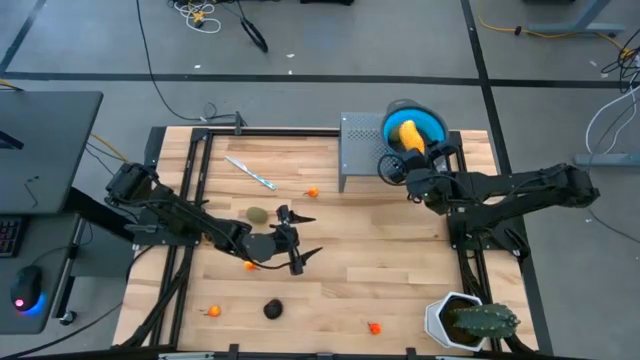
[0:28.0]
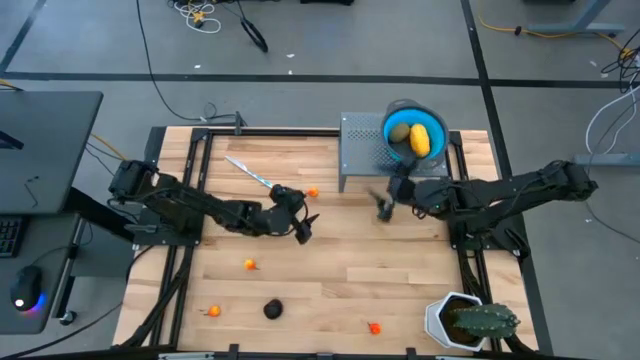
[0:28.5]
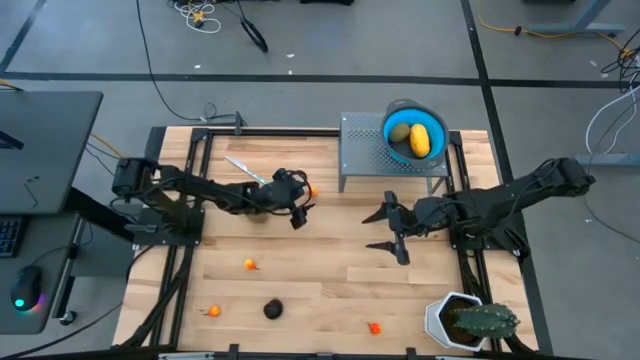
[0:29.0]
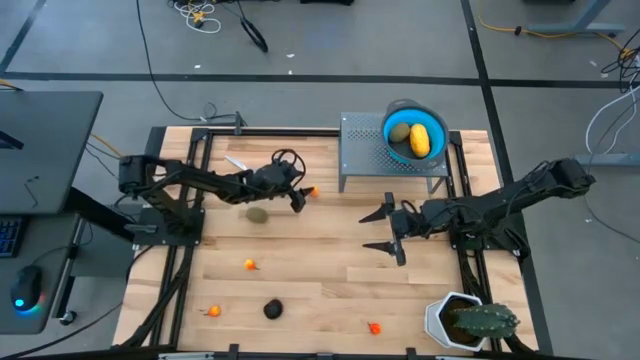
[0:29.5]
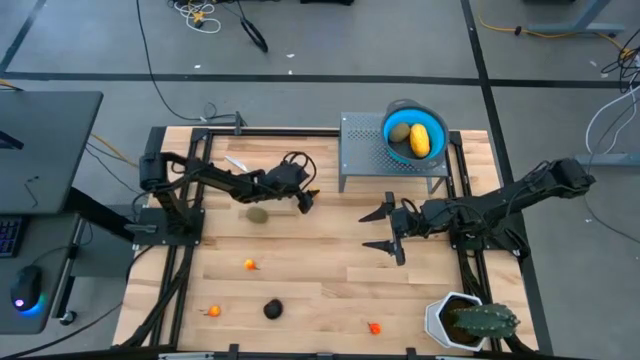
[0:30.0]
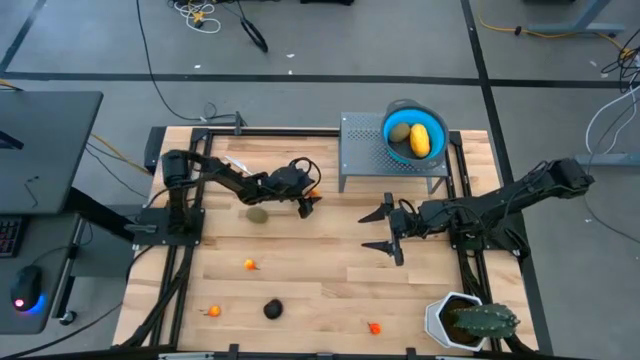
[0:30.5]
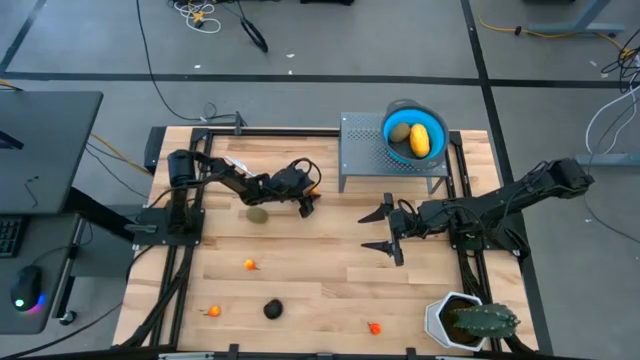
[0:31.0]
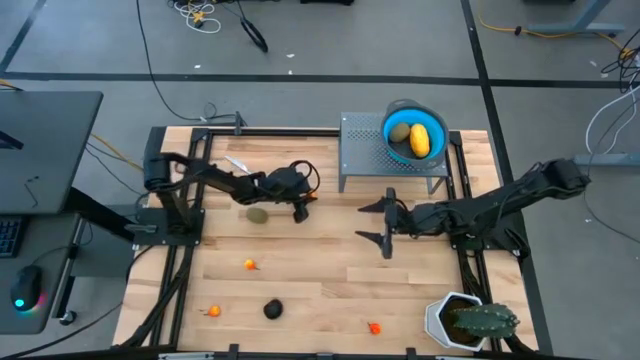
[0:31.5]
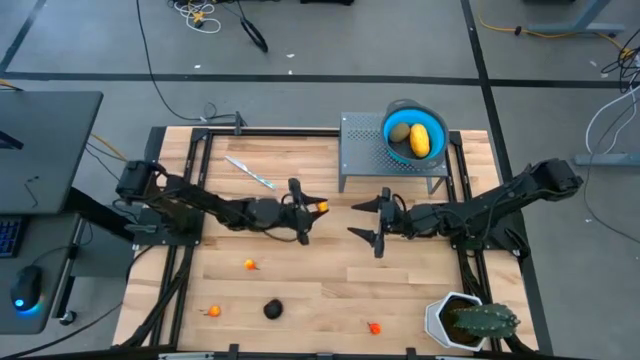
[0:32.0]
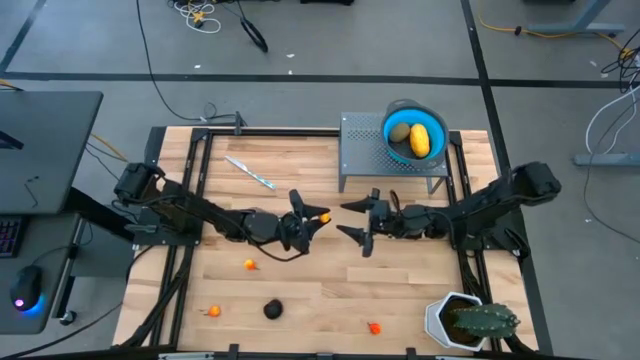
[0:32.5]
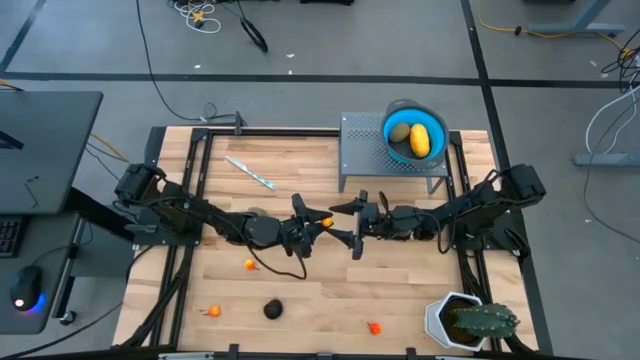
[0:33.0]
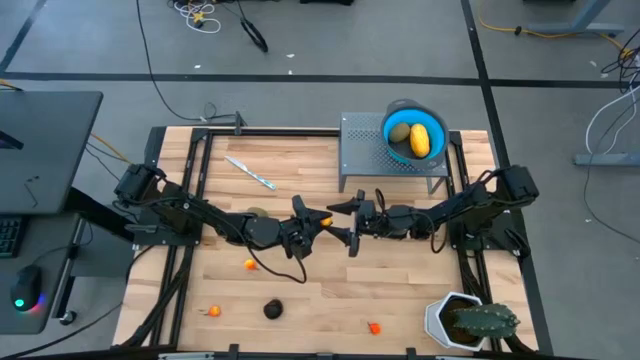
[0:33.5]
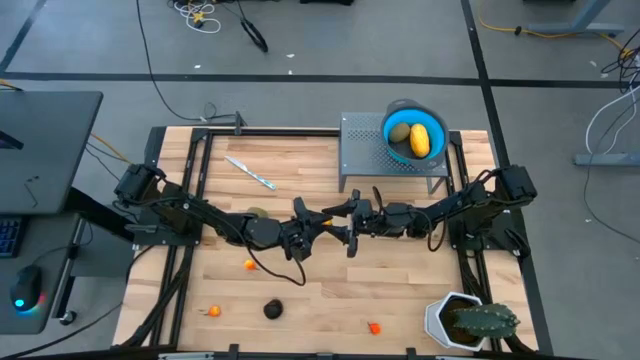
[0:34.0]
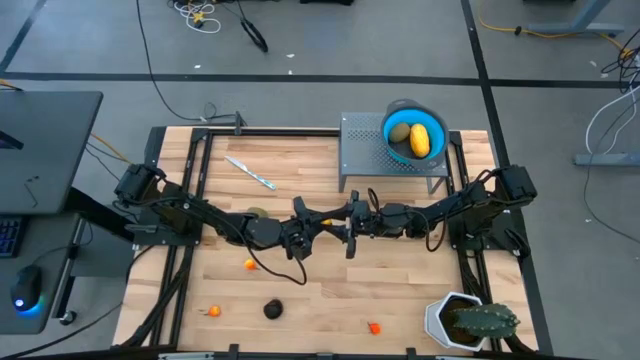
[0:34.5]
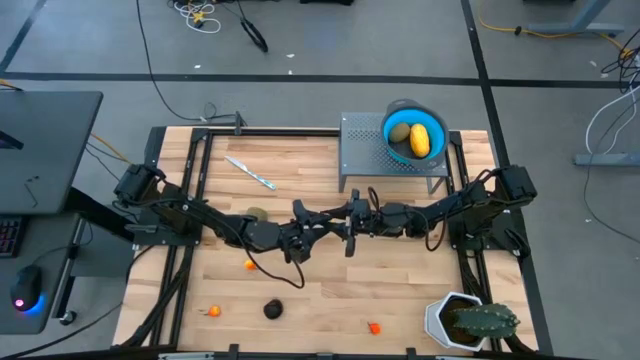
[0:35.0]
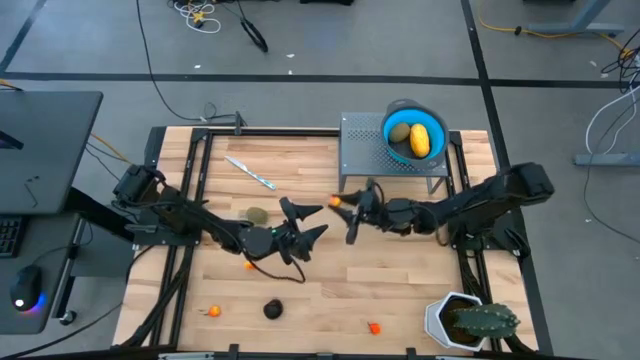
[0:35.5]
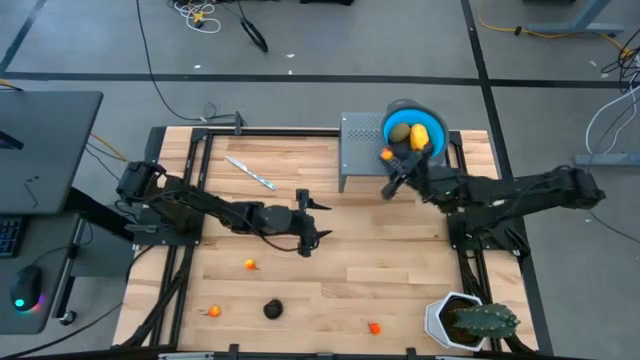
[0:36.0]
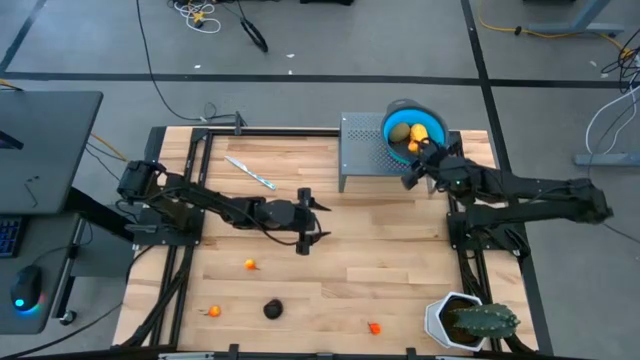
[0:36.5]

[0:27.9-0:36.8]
Task: Pick & Place Fruit
Put the orange pear into the blue strainer bowl on the shelf

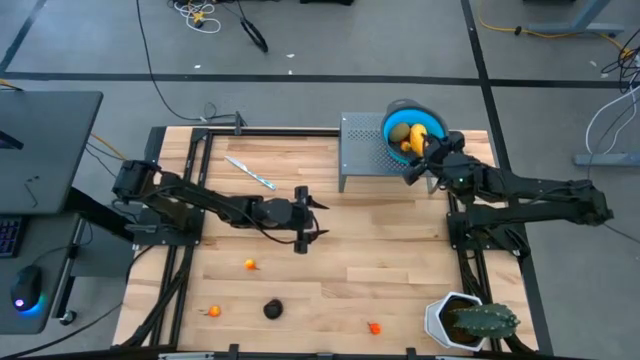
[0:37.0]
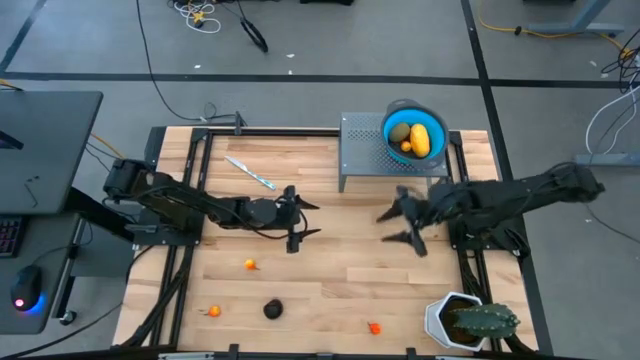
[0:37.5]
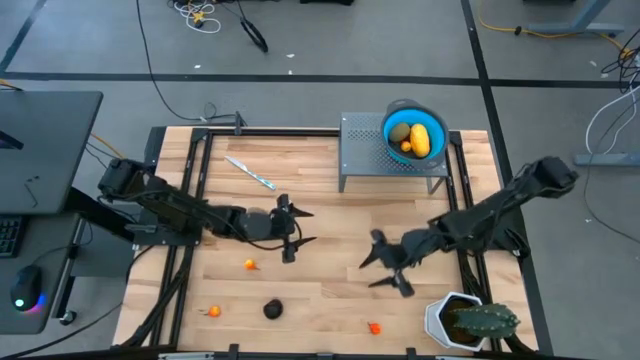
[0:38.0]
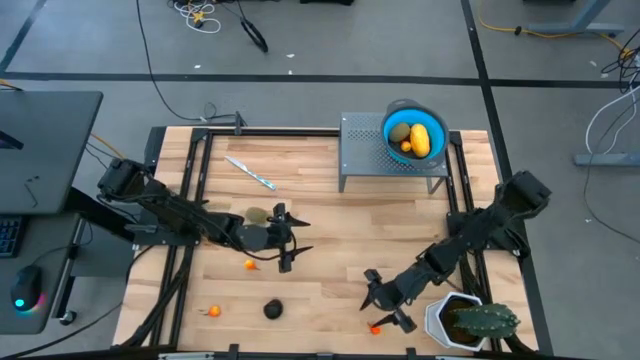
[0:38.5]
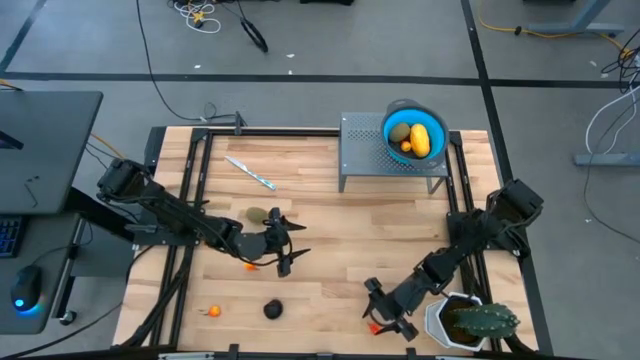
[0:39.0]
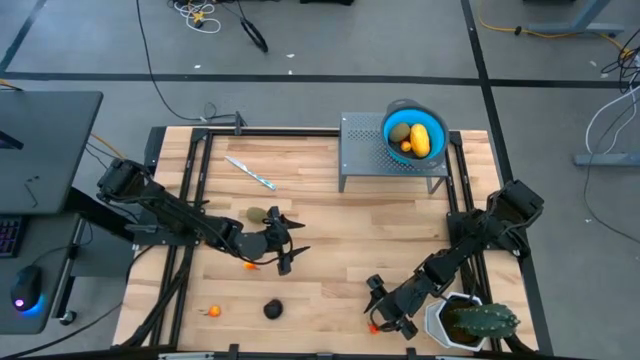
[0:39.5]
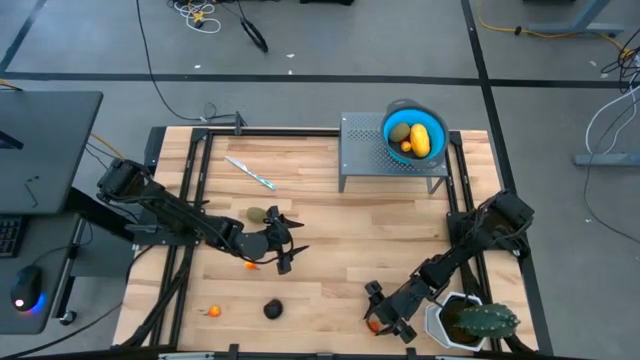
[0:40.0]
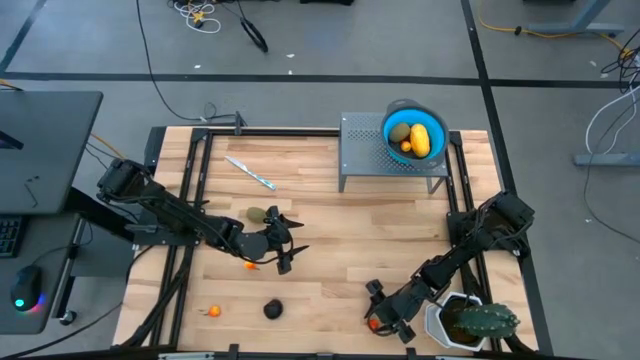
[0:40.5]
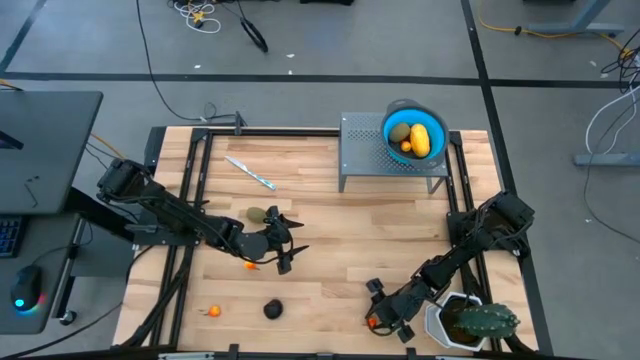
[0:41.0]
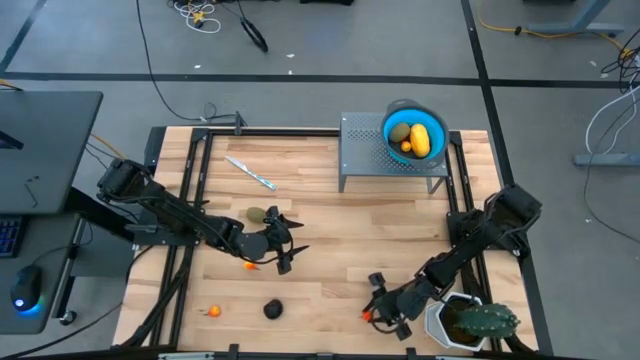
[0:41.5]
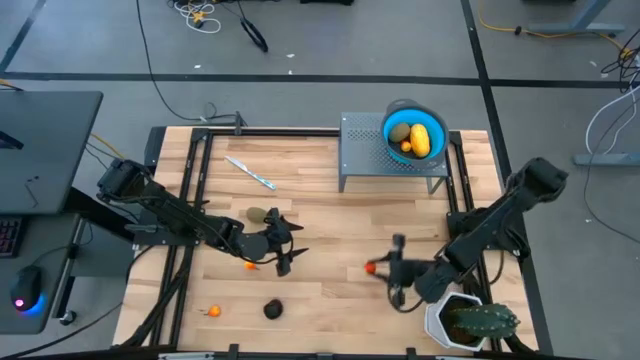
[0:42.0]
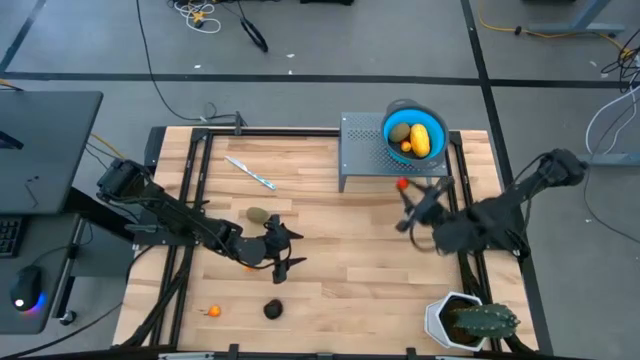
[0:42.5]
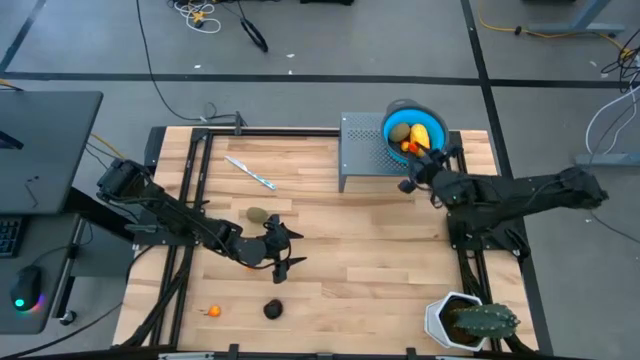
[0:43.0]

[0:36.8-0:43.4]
Put the orange pear into the blue strainer bowl on the shelf

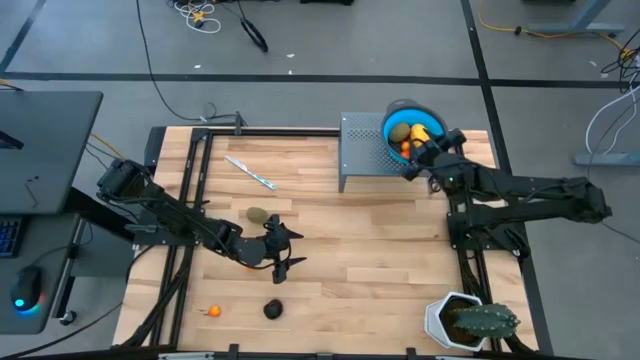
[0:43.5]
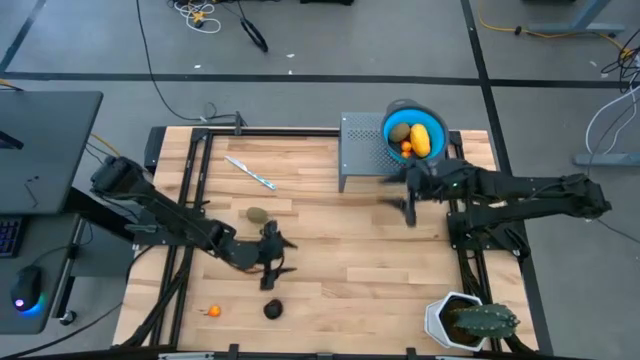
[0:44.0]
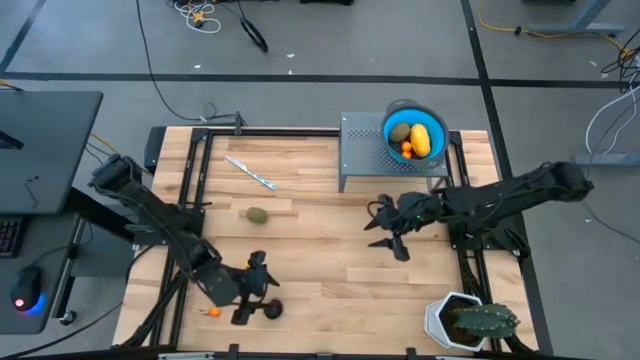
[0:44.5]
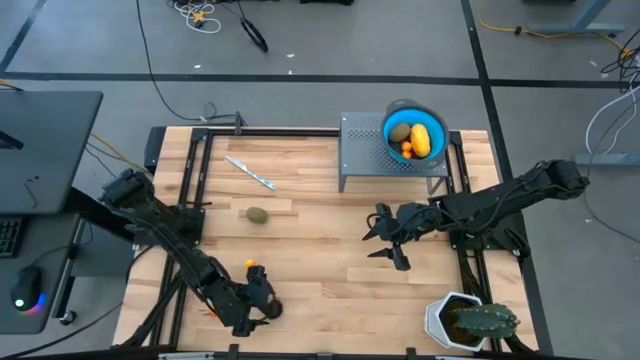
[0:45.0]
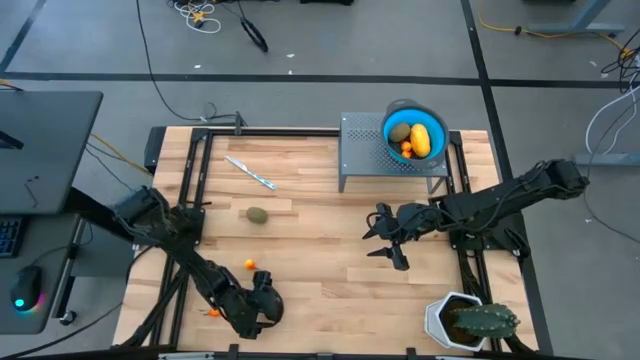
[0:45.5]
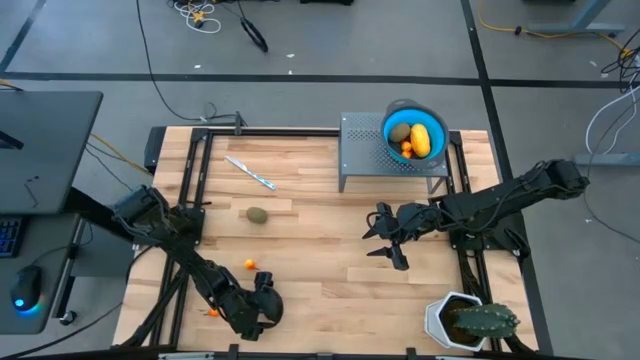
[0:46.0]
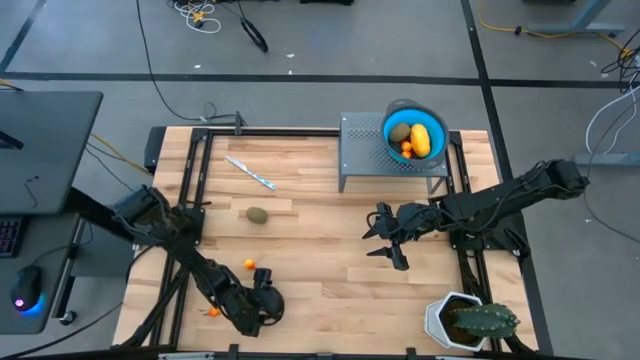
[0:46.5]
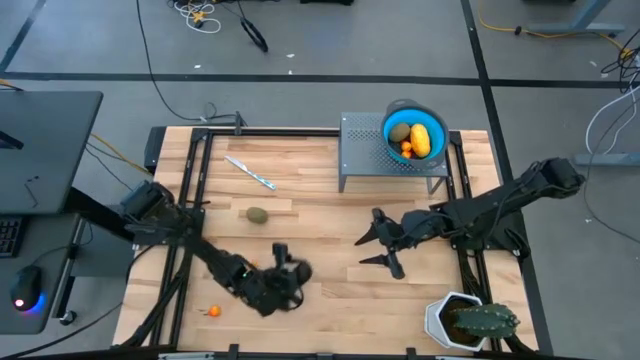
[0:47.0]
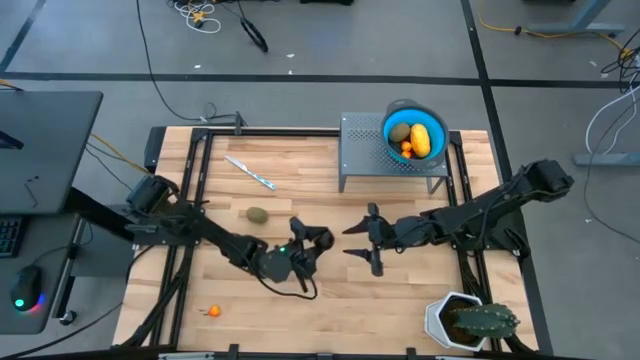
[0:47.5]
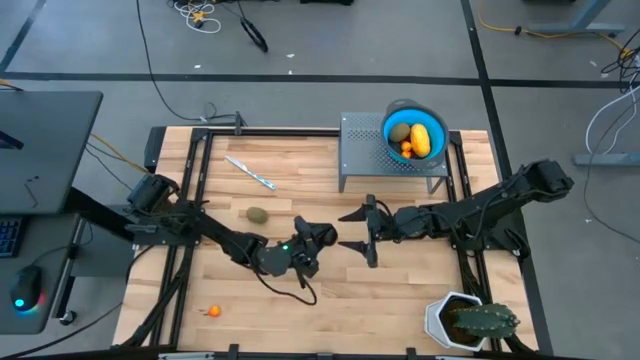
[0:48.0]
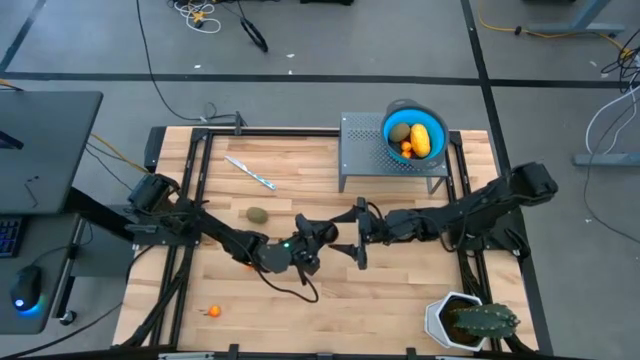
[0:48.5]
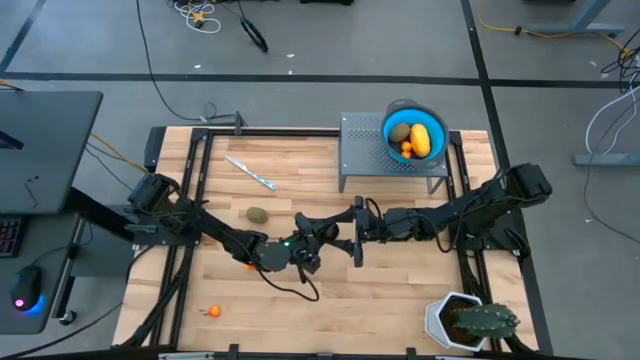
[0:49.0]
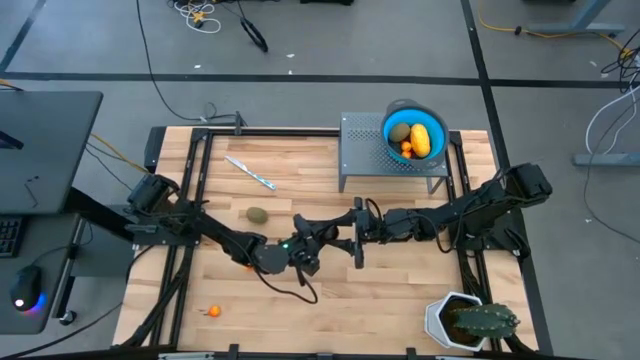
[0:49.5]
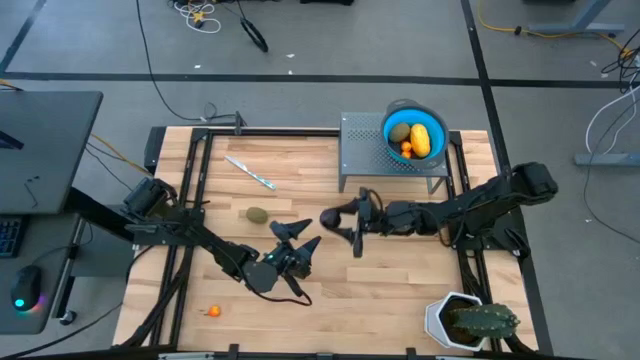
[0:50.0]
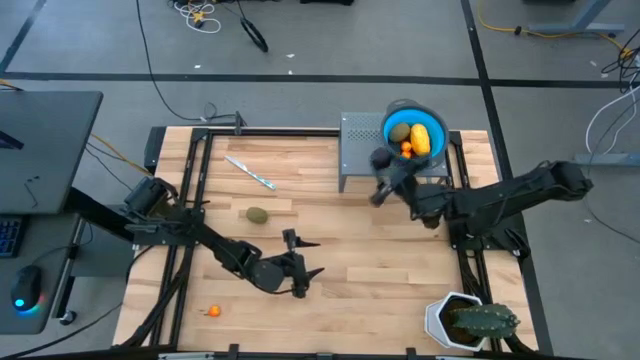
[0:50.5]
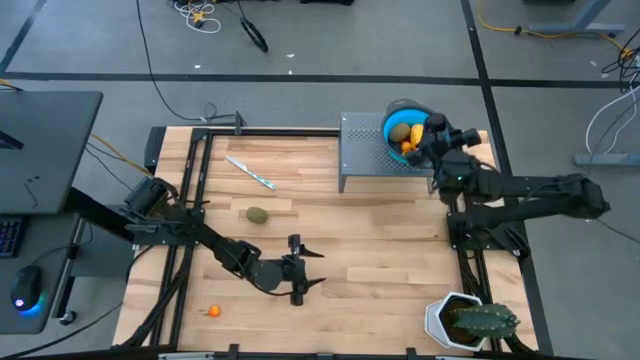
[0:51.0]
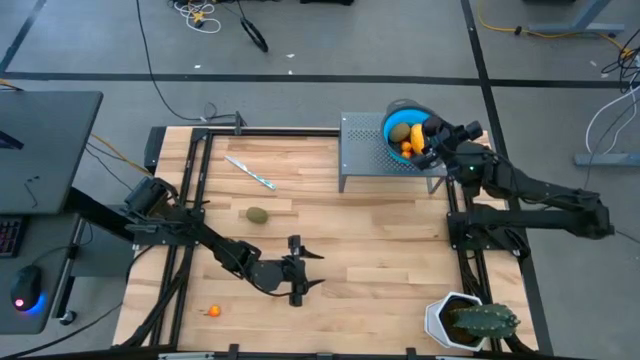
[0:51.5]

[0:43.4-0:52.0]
Put the violet plum into the blue strainer bowl on the shelf
